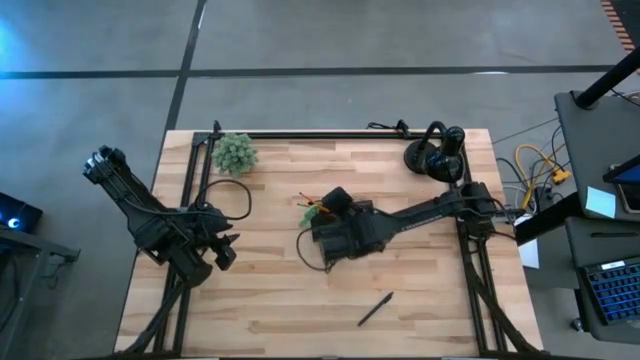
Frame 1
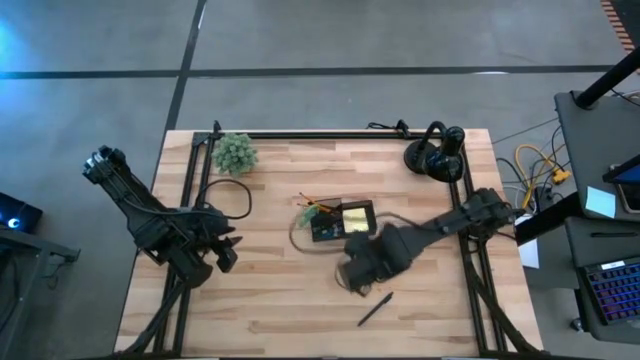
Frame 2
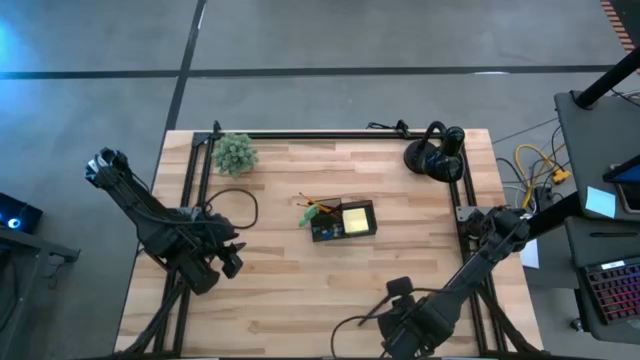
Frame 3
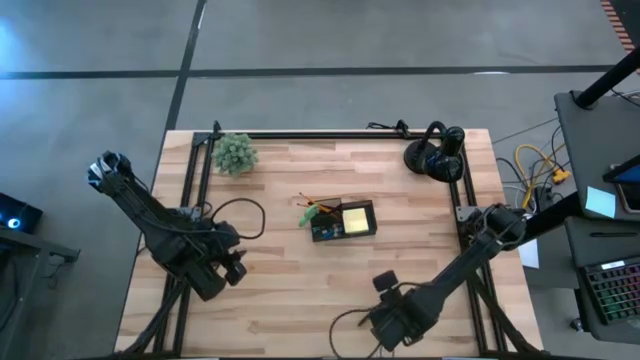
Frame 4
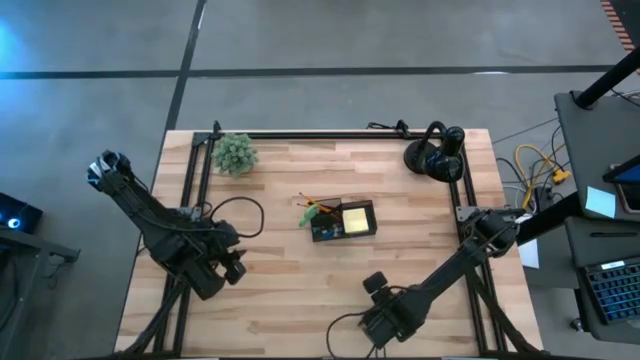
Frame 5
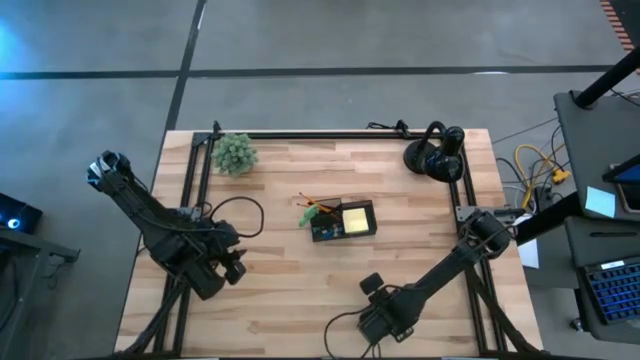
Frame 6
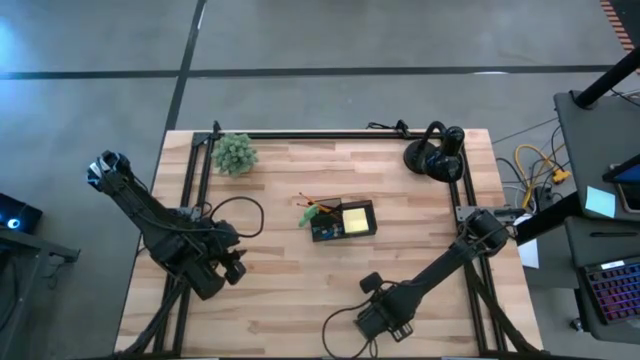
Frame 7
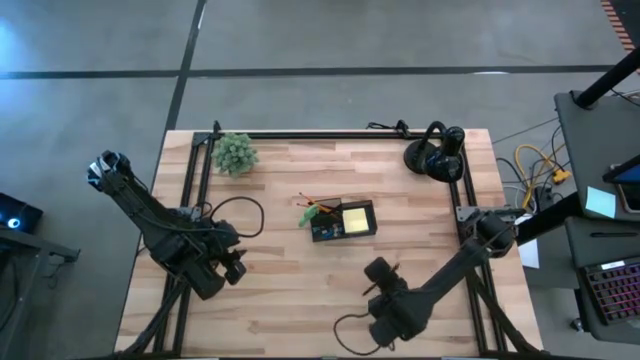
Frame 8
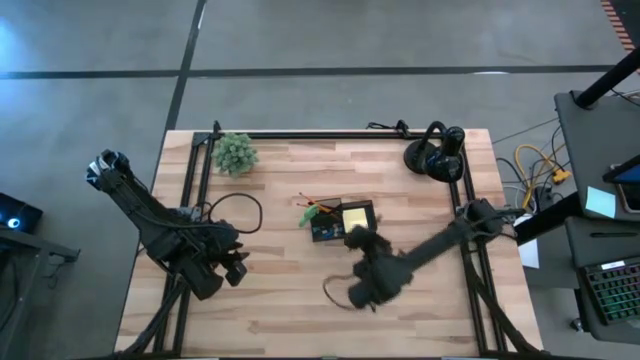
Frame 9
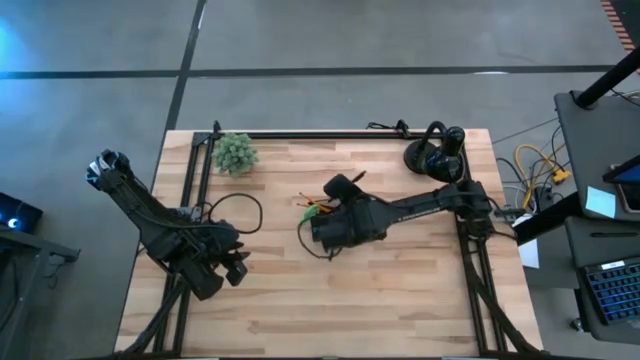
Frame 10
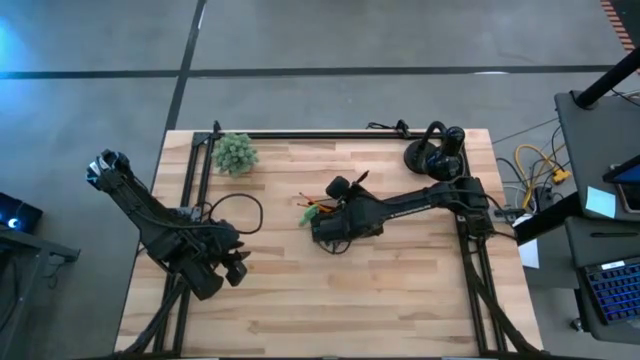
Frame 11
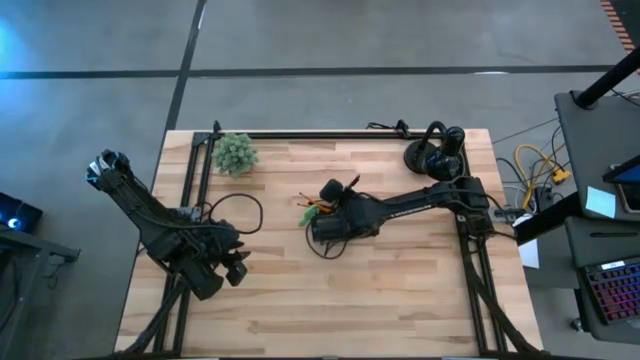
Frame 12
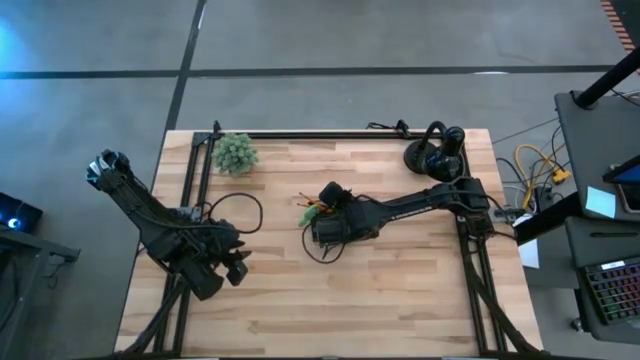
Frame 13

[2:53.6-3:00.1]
Task: Pick and place office supplies into organizer
Put the black pen into the black desk organizer

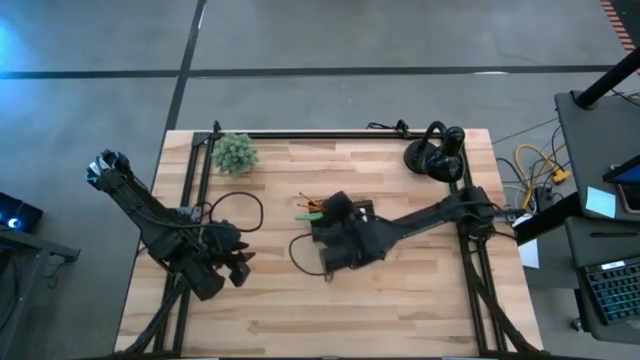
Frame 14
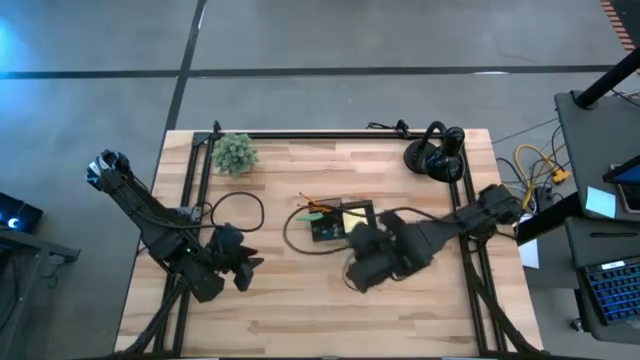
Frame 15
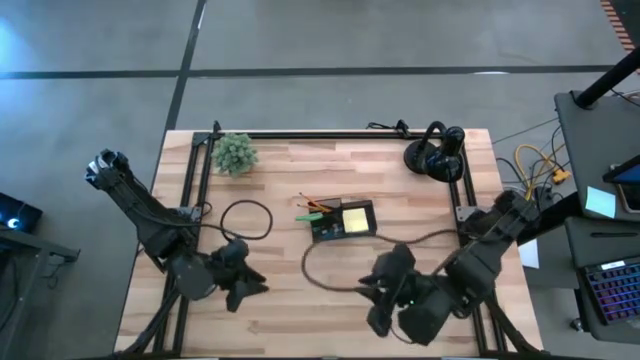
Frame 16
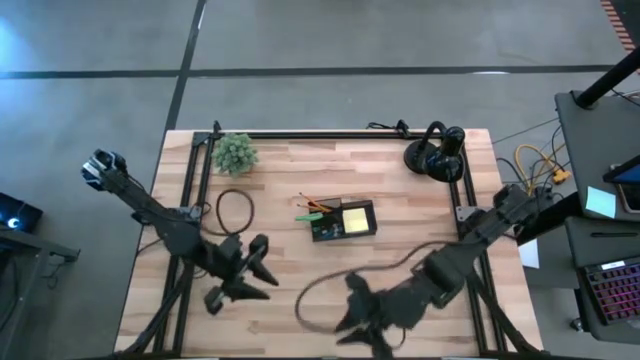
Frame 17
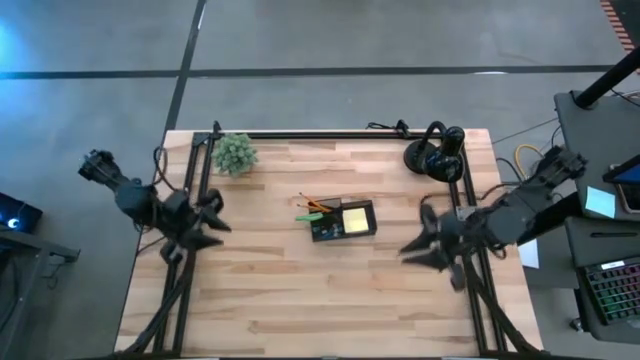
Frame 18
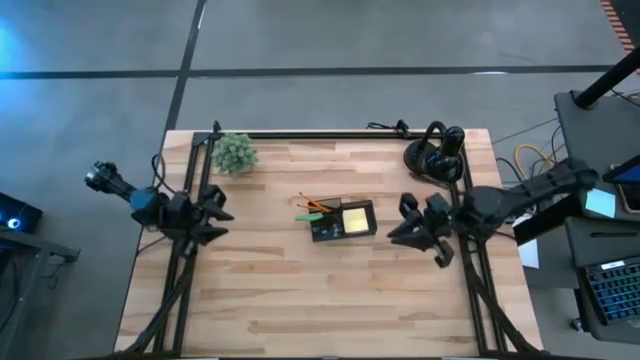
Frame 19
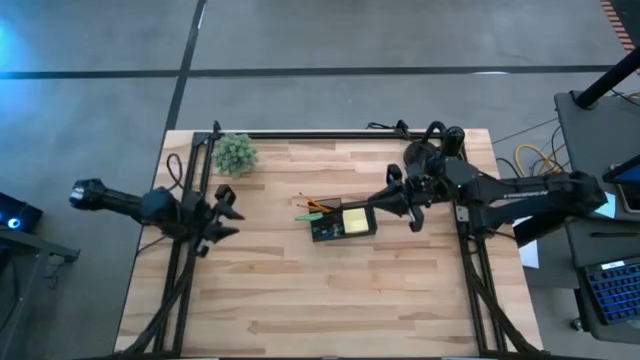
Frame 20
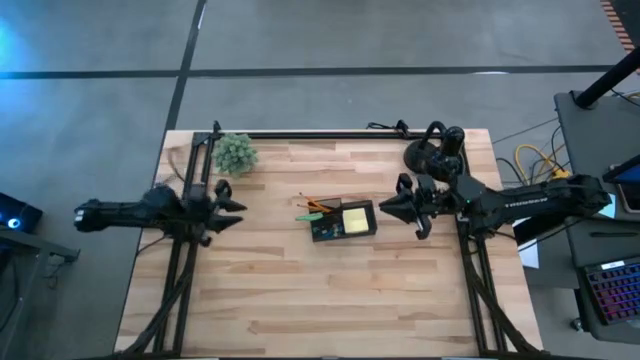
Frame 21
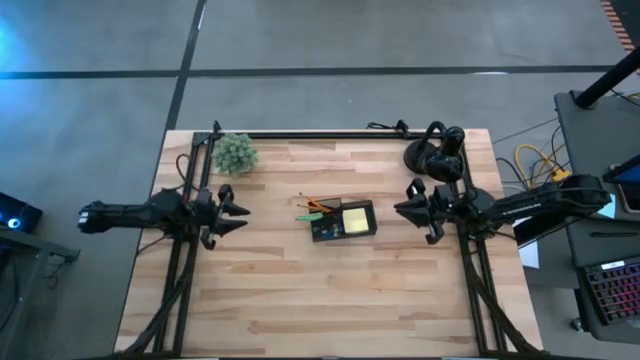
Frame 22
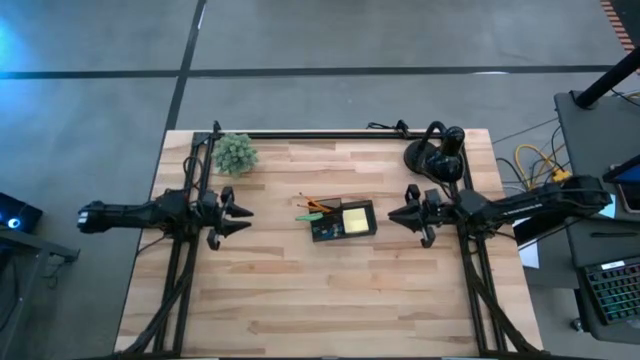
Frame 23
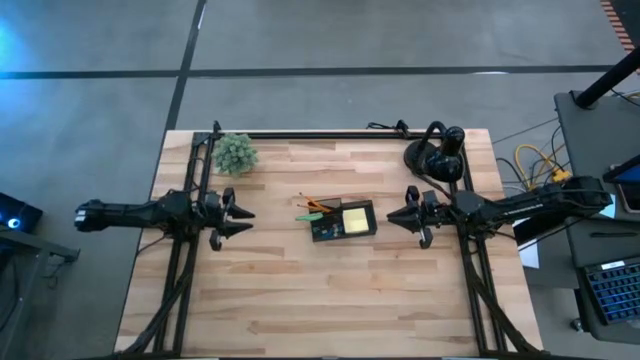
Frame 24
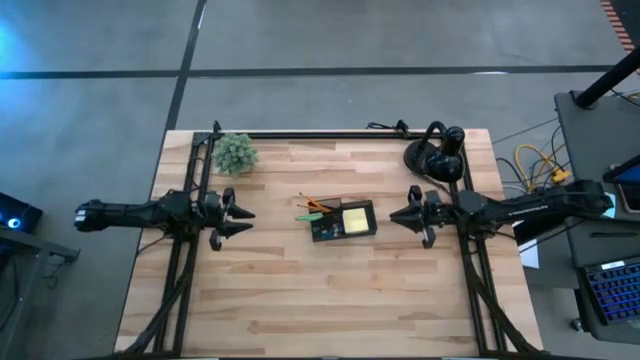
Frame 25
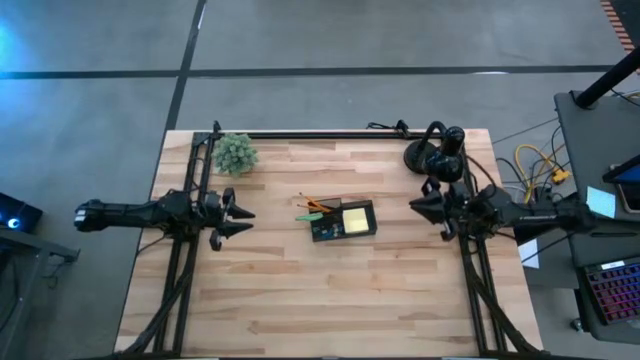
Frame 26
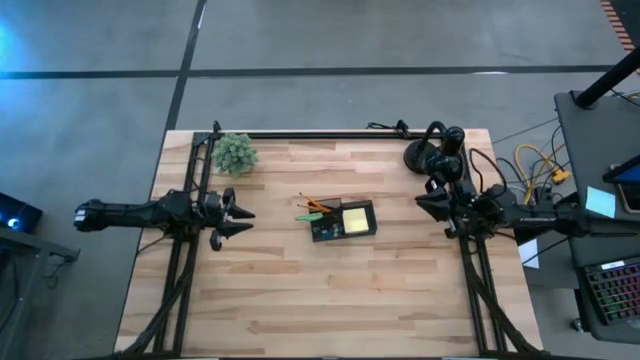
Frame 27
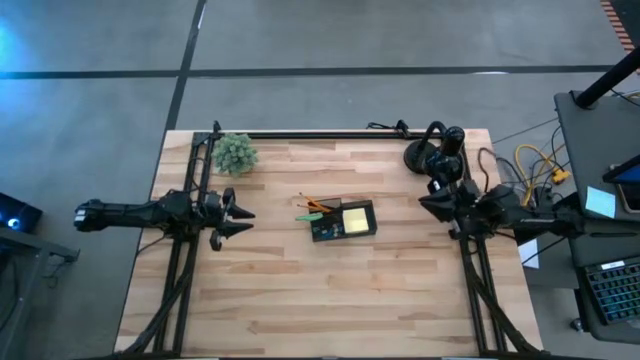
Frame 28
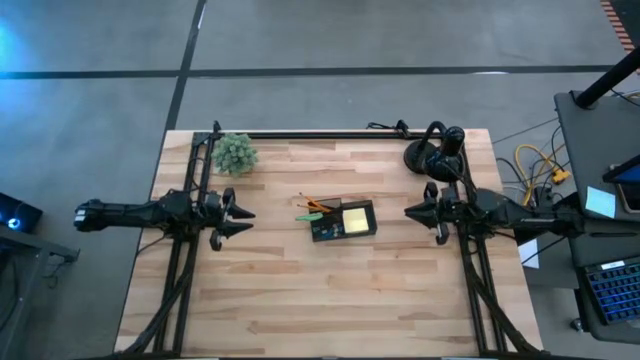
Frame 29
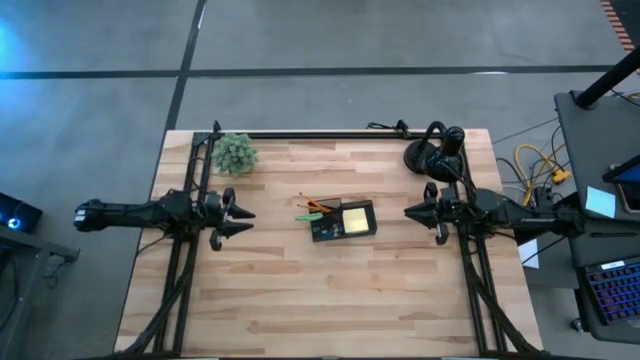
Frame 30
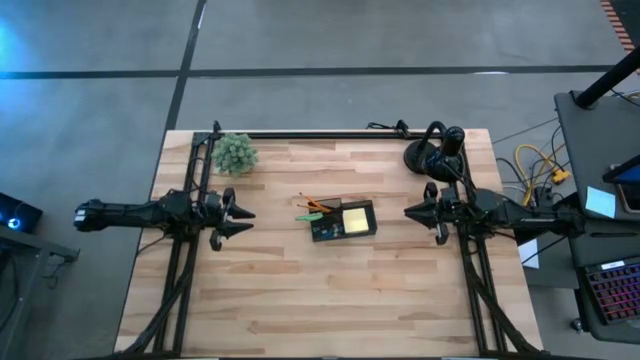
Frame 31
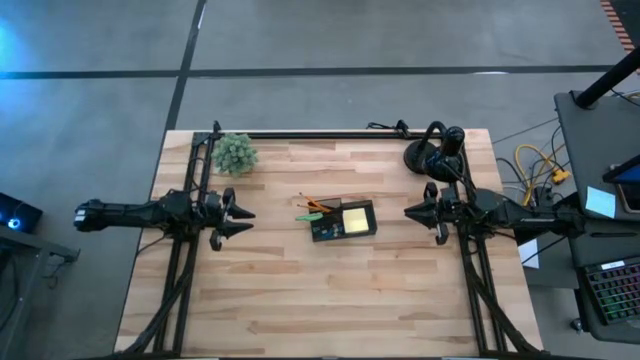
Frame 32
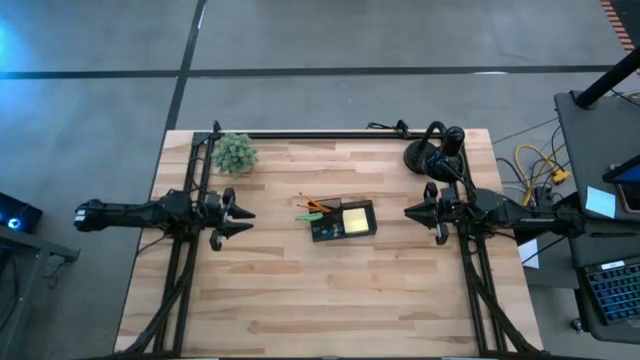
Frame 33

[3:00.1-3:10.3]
Return to Home Position

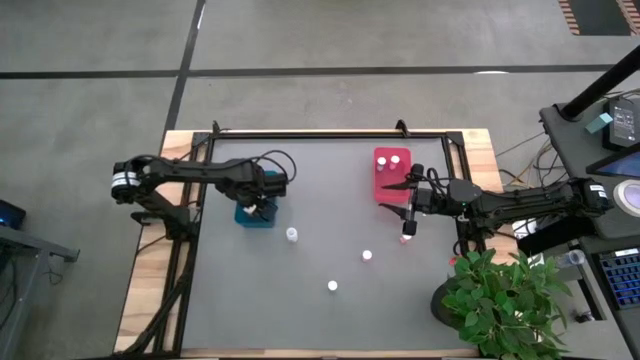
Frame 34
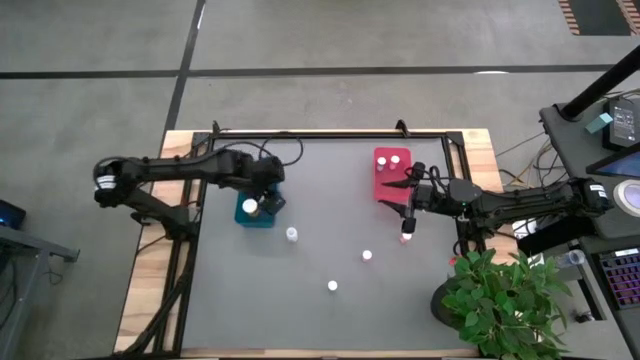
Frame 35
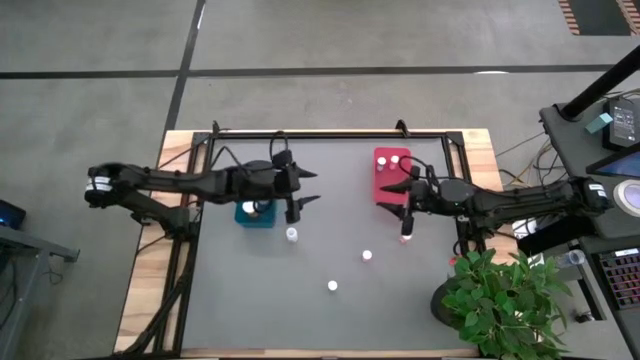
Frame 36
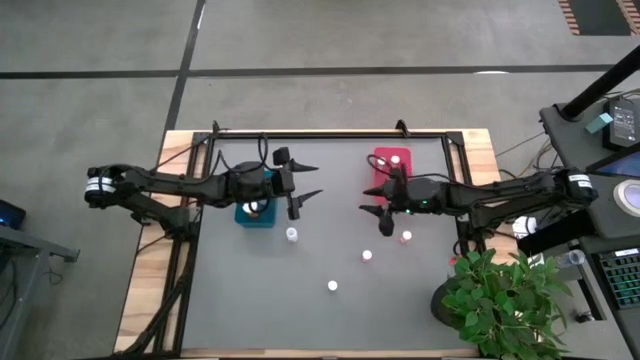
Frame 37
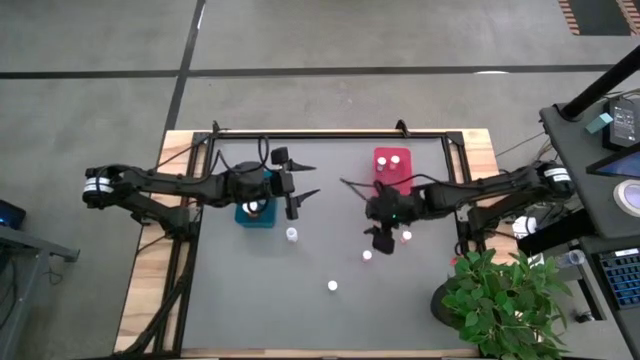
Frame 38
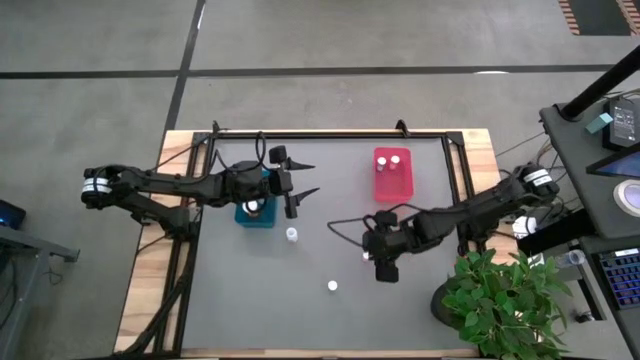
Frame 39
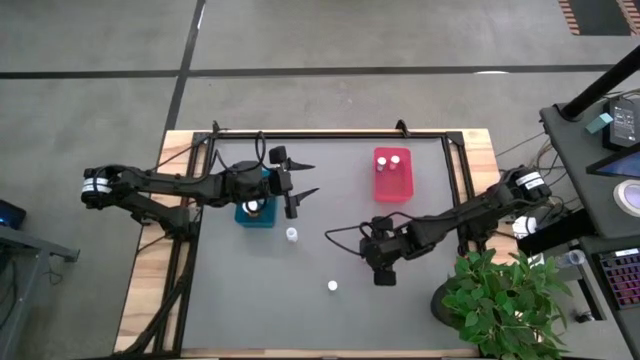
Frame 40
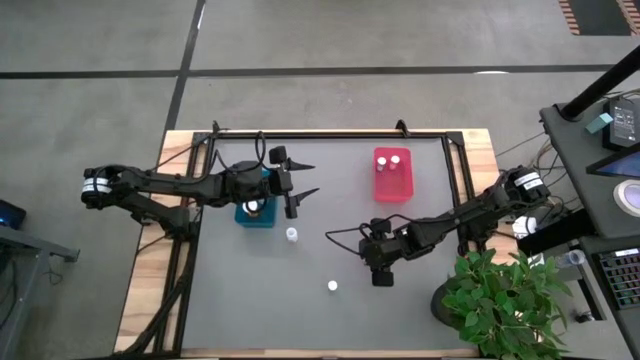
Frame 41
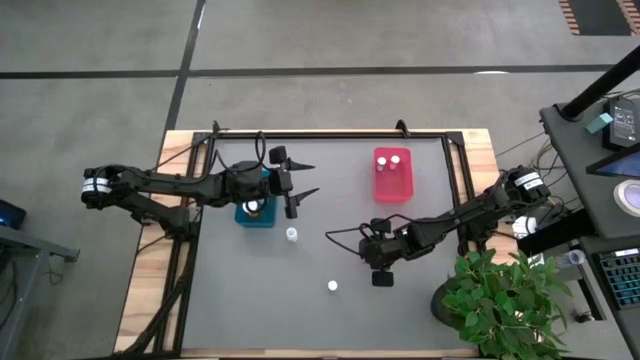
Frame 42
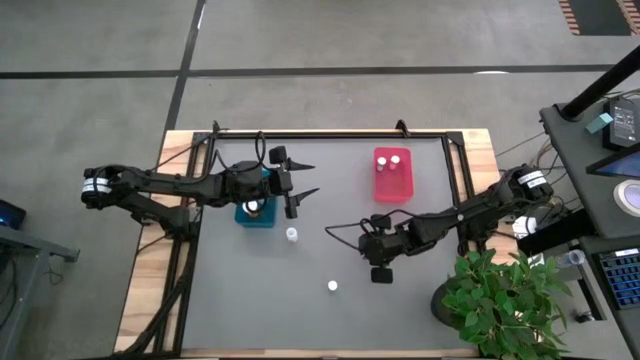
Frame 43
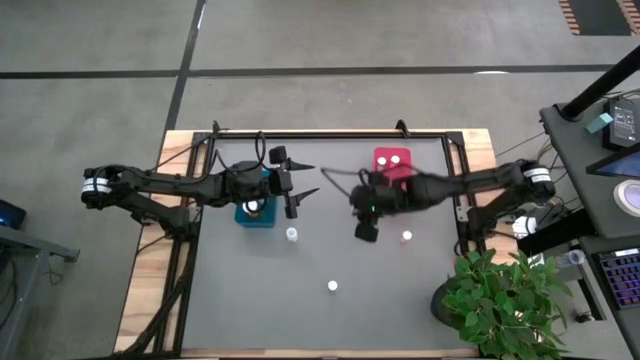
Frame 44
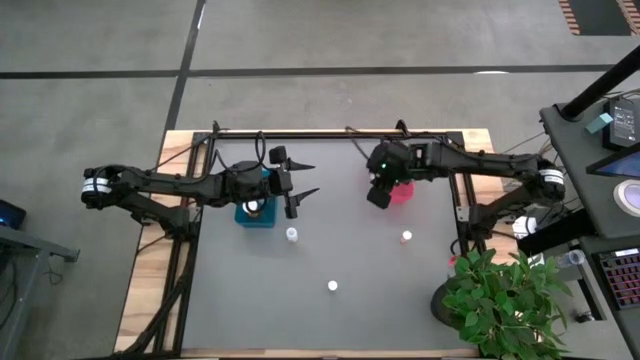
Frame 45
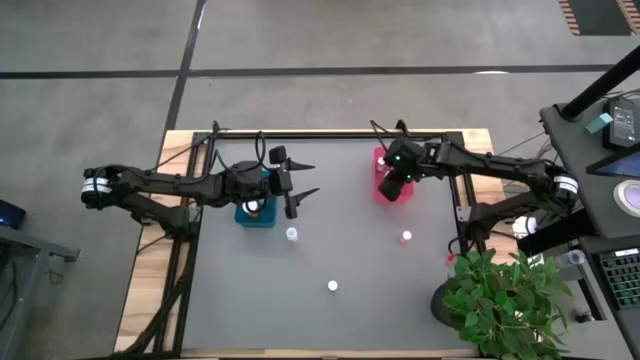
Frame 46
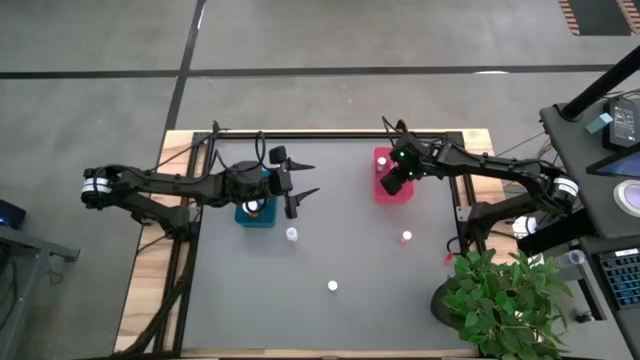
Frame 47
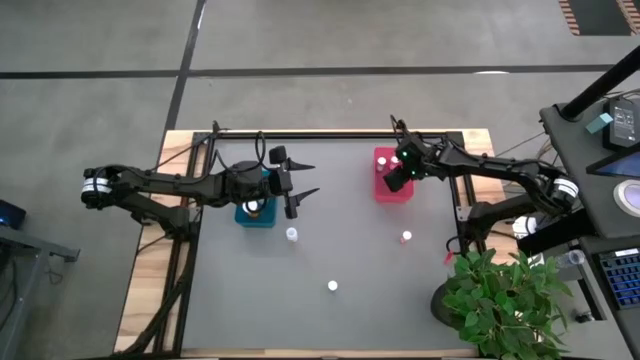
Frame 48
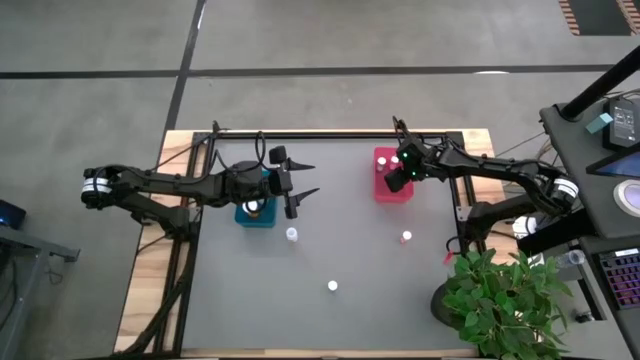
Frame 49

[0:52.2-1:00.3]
Task: Pick and place medicine bottles into bin by pill shape (circle, oval)
Put the pink tablet bottle into the red bin
